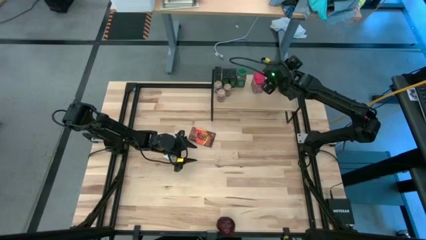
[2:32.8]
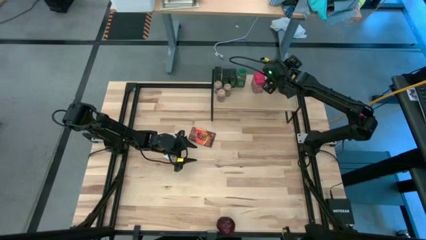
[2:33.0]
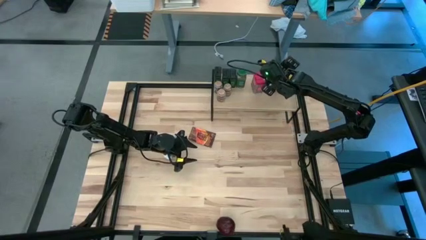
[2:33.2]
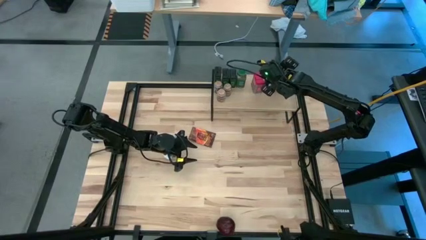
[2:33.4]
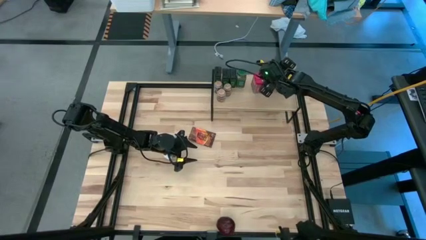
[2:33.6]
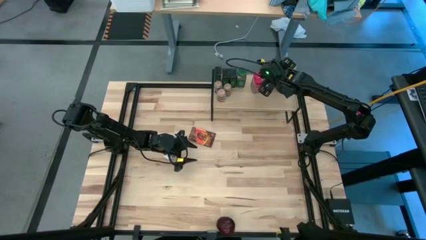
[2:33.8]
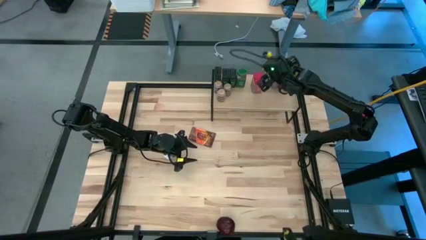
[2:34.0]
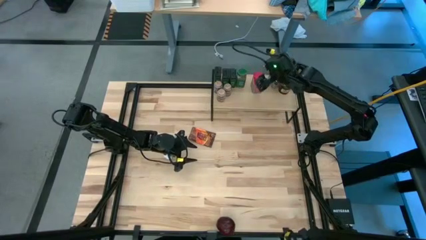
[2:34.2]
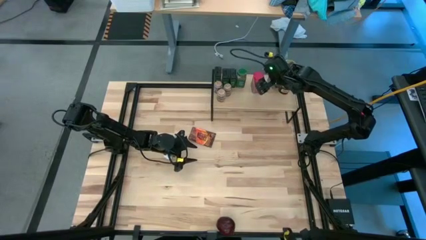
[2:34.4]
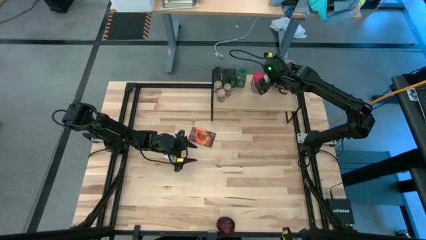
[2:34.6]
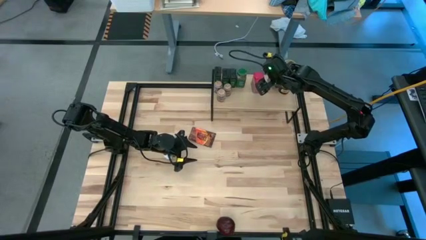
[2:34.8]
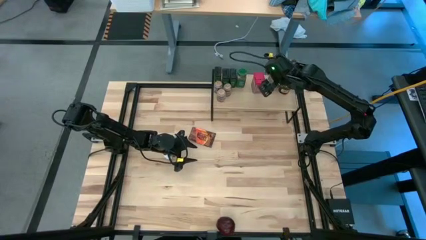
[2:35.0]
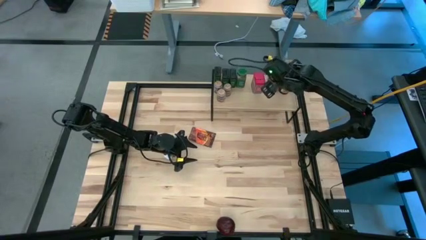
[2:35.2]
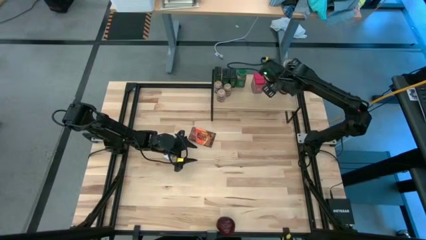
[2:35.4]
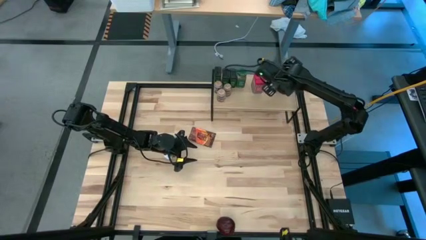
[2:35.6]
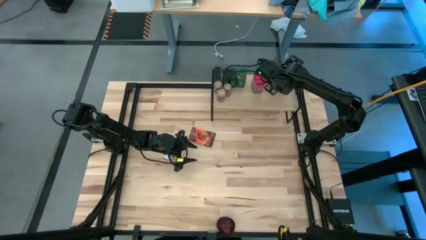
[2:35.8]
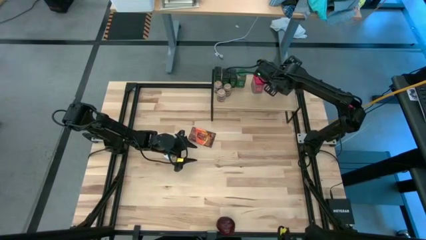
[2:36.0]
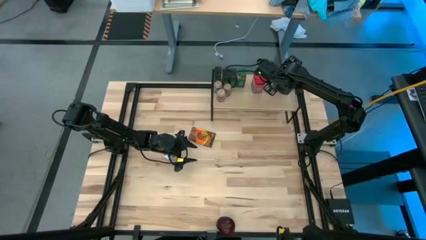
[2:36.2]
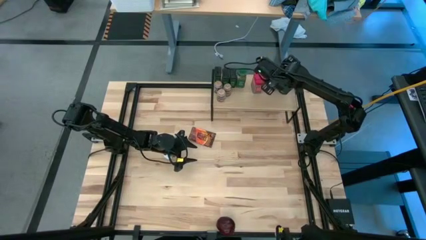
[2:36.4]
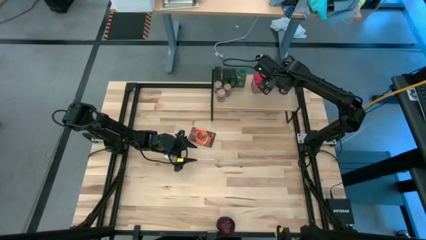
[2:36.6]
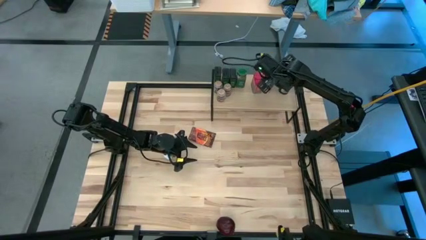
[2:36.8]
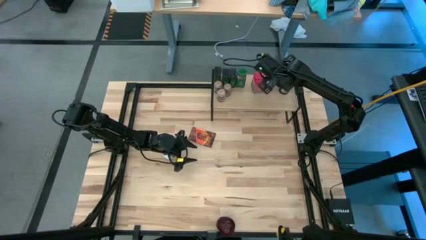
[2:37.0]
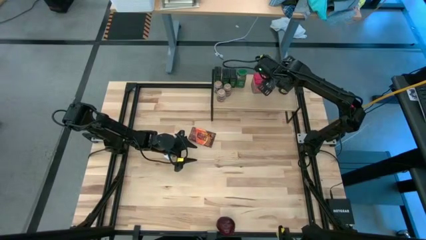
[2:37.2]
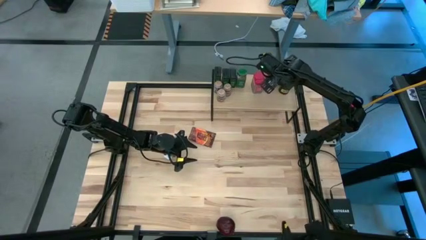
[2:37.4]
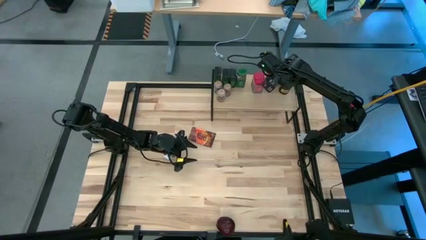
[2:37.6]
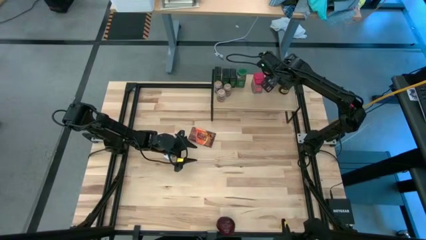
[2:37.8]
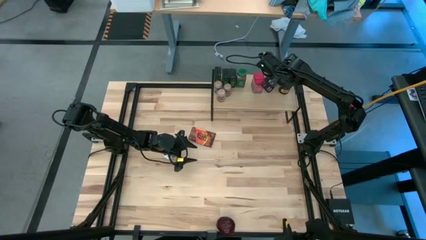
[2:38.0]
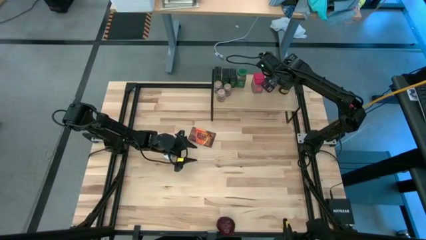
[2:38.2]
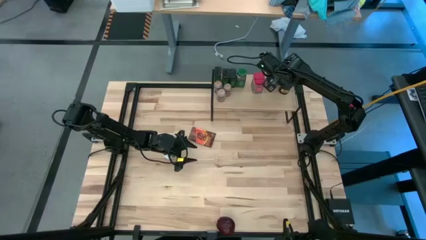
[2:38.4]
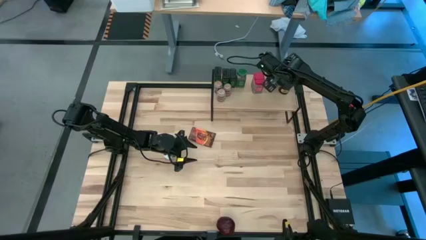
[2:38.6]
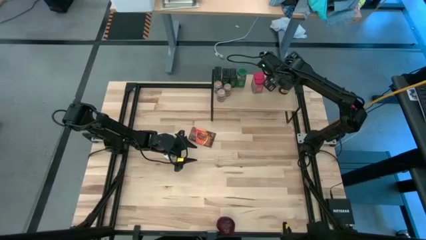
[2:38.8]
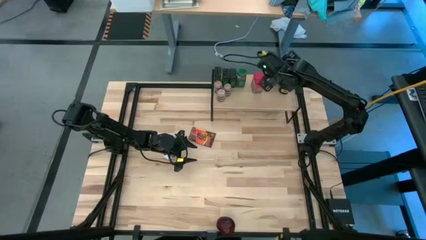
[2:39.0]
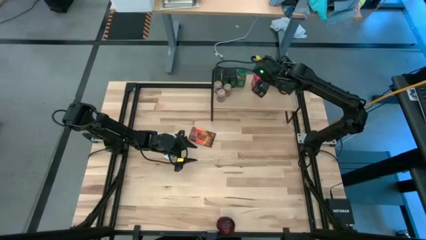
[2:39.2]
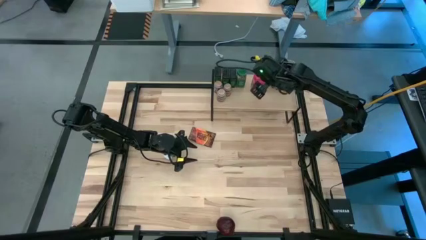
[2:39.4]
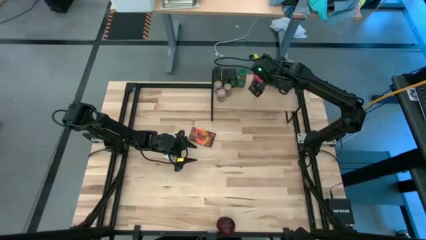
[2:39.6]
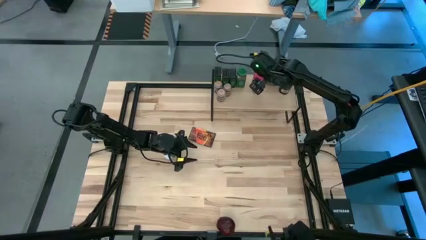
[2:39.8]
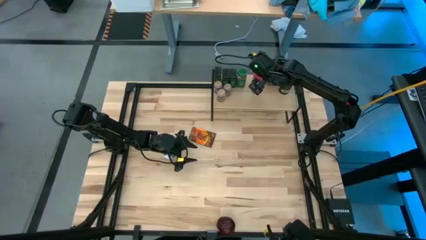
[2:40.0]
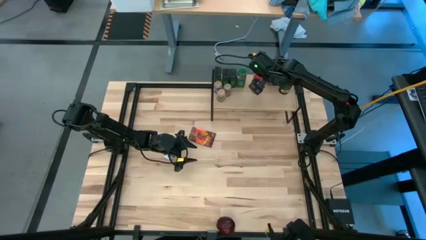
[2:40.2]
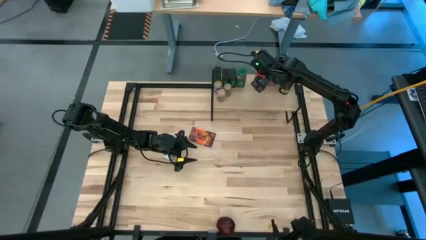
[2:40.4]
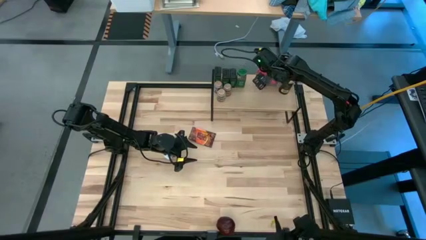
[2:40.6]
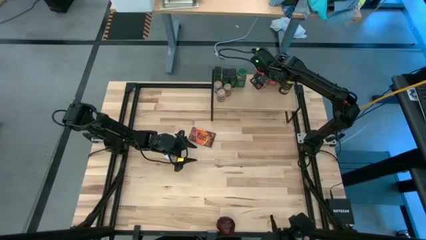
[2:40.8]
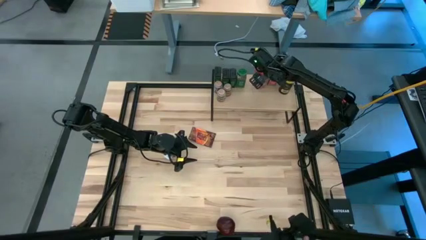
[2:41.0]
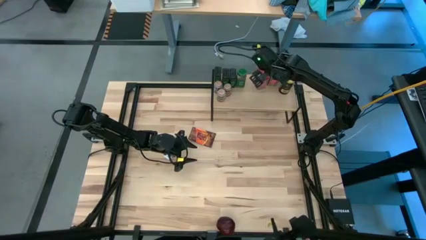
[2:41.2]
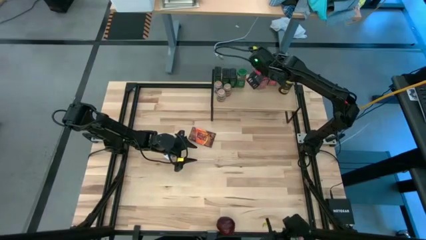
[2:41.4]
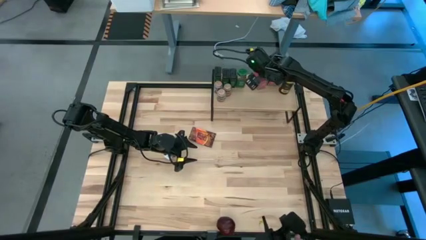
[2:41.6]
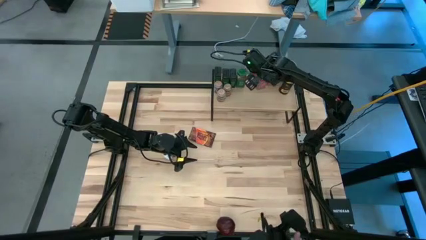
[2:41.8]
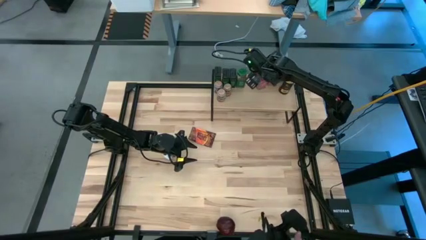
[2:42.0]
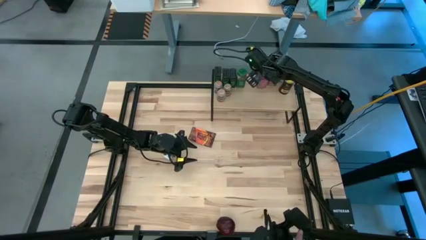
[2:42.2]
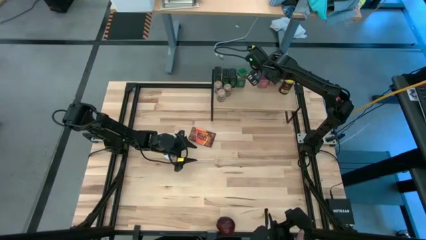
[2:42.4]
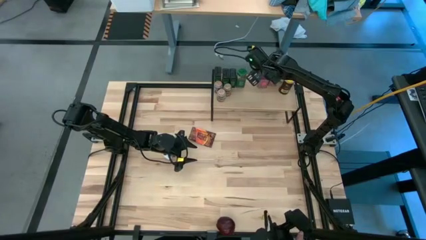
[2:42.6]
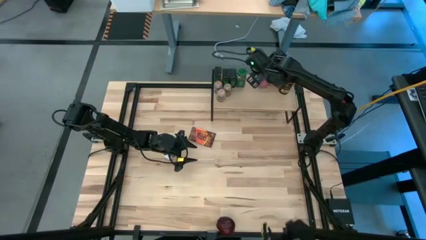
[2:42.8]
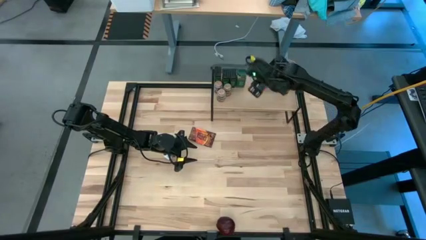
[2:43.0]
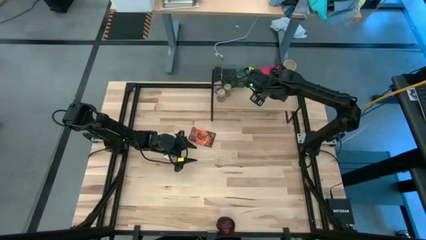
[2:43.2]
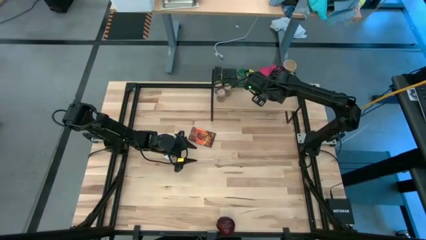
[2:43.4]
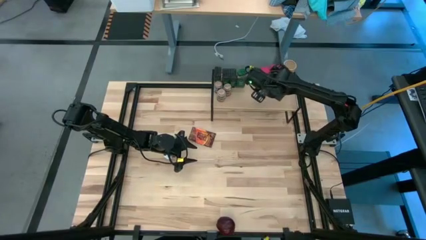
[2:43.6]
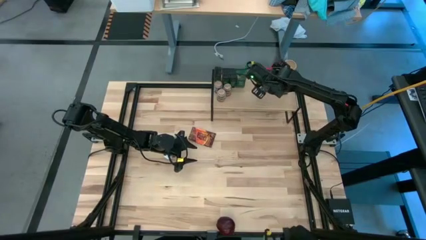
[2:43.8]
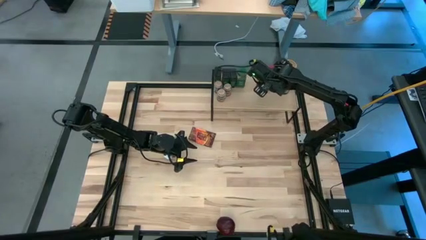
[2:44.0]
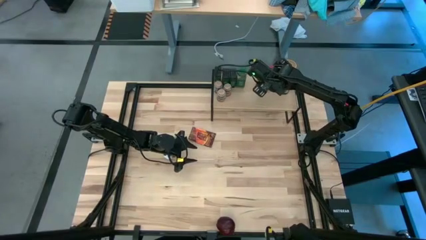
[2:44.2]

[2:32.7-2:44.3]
Task: Shelf spices
Put the red seasoning can on the shelf

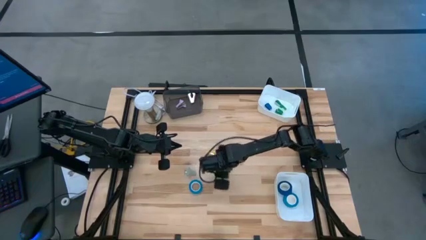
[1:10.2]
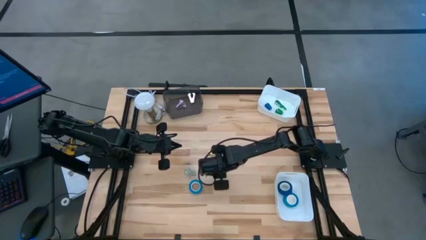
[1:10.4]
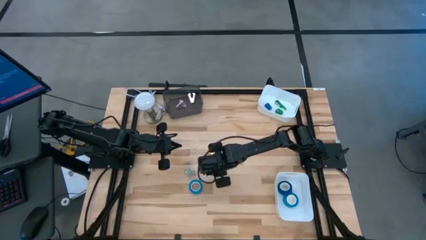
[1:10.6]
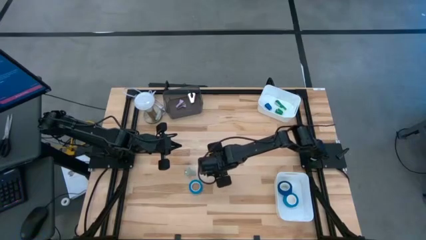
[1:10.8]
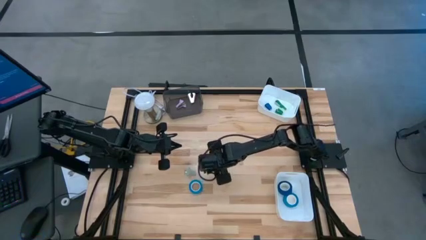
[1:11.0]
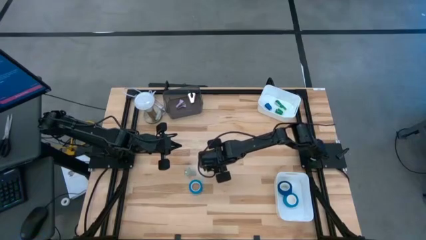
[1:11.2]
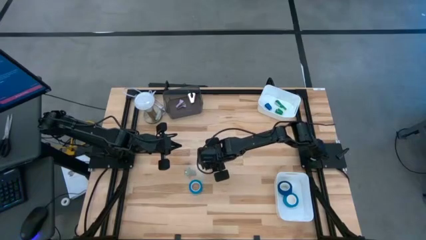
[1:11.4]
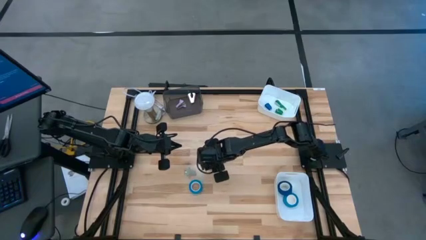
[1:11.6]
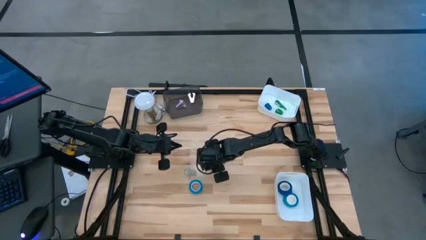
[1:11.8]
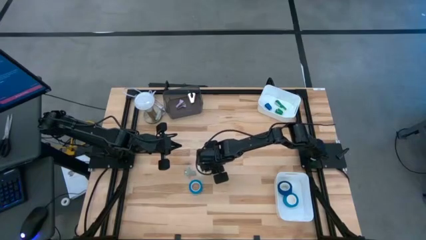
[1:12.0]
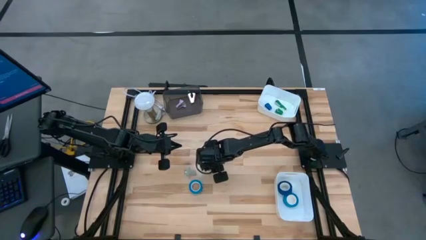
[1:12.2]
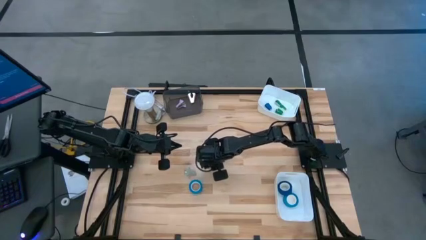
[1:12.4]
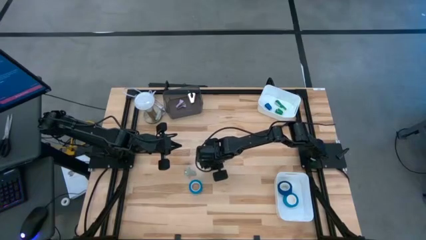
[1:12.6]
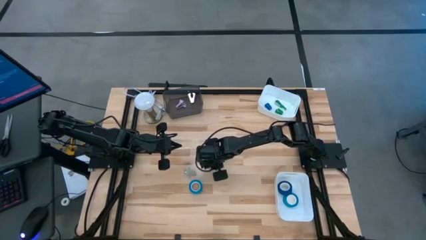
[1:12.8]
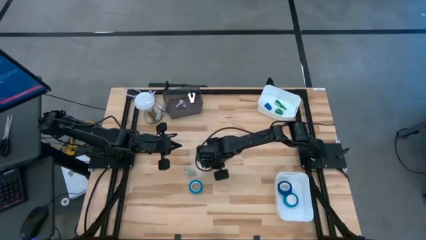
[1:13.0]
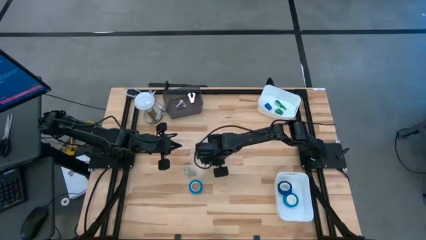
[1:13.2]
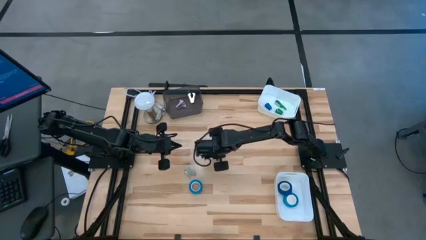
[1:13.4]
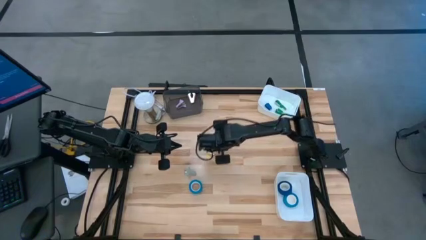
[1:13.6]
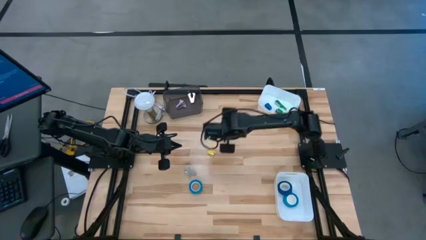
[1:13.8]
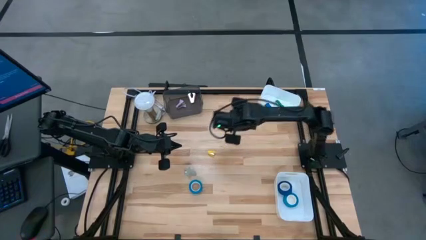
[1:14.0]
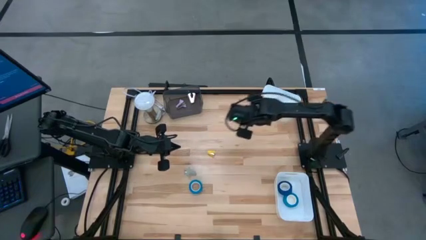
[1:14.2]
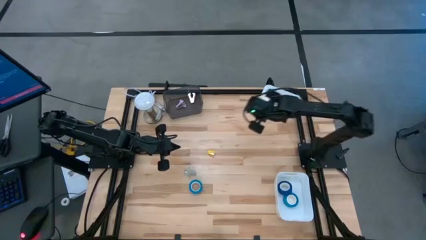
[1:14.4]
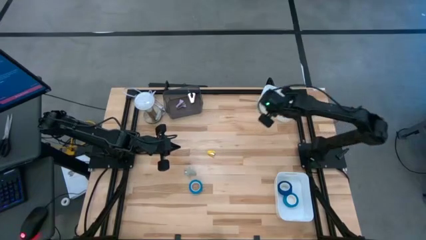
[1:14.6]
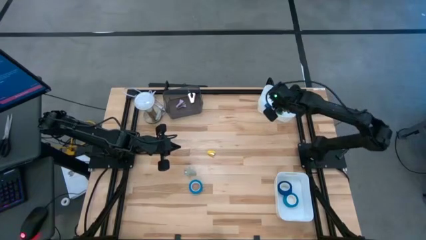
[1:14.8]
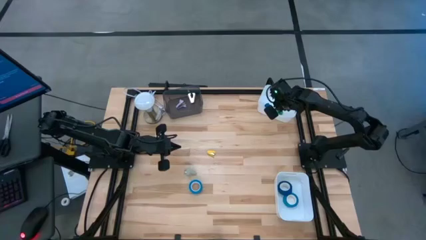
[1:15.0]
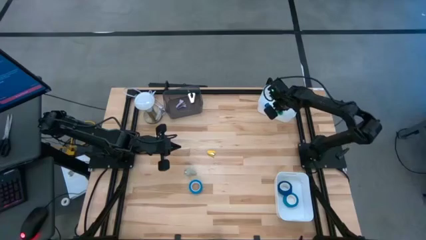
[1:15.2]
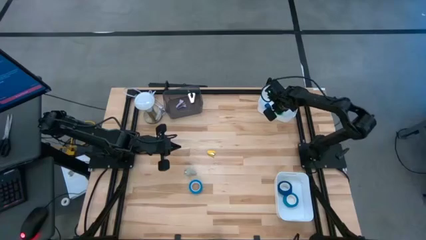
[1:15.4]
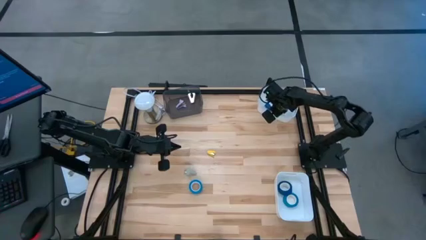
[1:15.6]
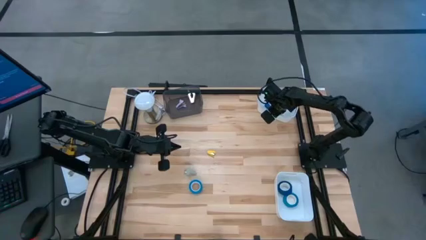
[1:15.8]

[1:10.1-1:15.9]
Task: Pick and place Stapler, Stapler remover, tape
Put the blue stapler into the top white bin
